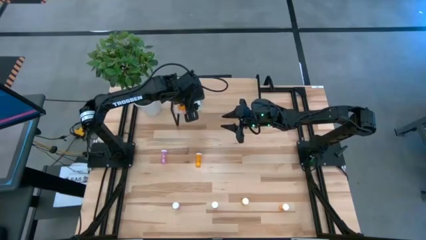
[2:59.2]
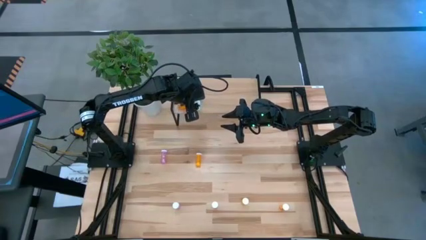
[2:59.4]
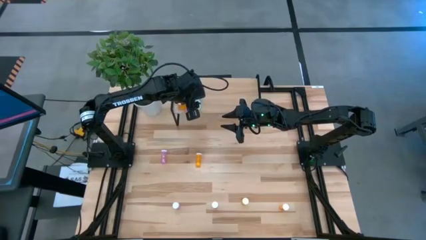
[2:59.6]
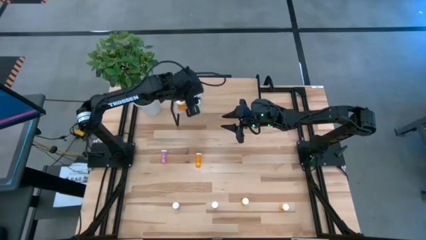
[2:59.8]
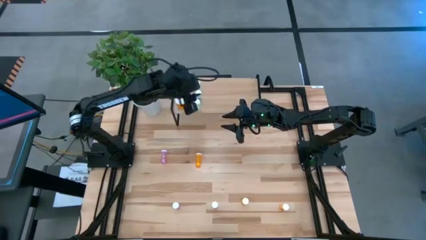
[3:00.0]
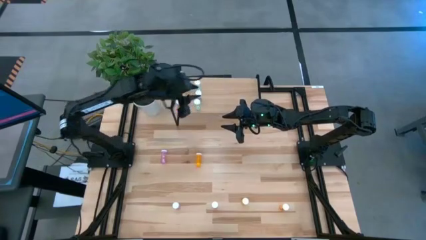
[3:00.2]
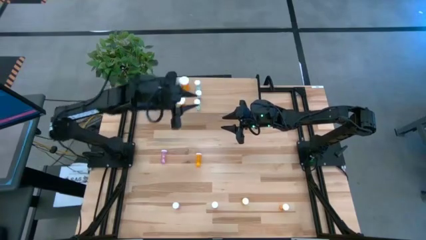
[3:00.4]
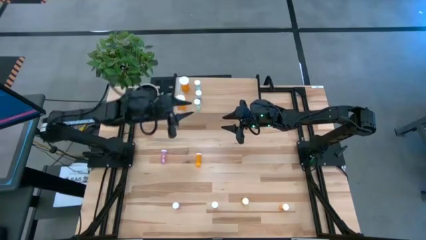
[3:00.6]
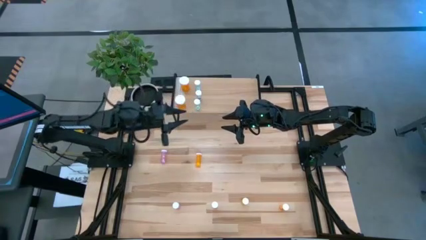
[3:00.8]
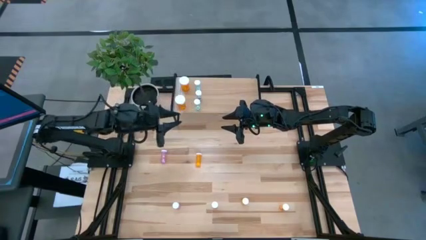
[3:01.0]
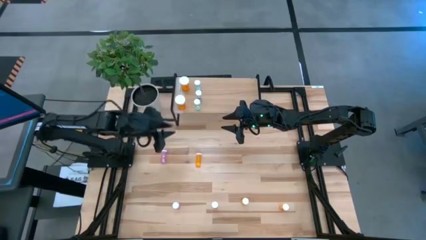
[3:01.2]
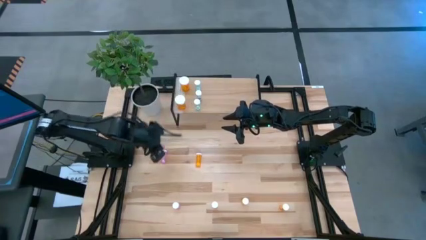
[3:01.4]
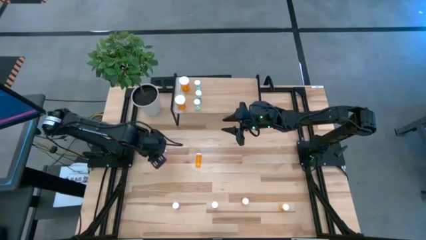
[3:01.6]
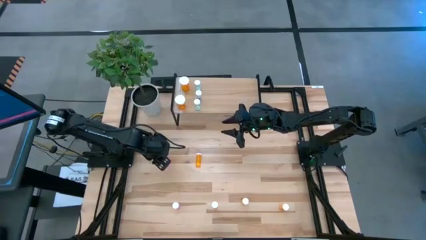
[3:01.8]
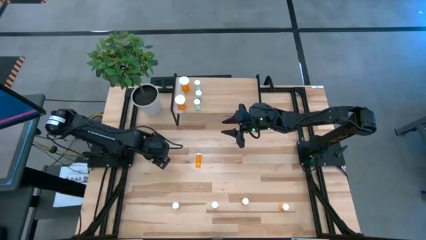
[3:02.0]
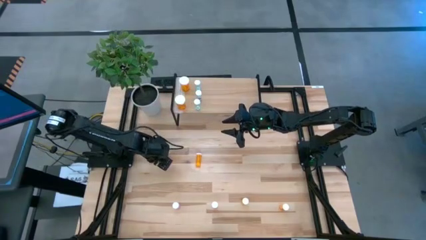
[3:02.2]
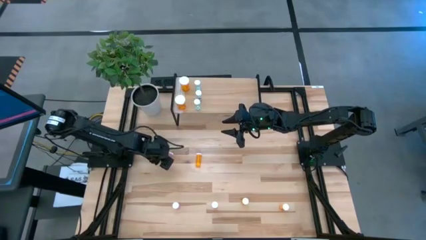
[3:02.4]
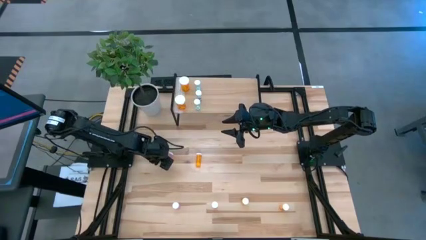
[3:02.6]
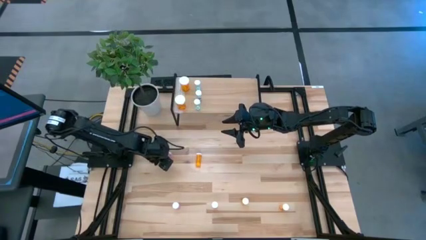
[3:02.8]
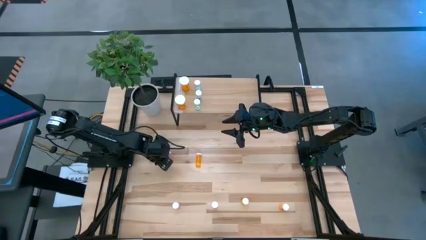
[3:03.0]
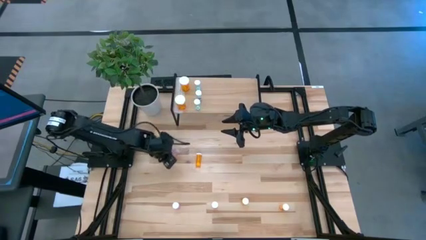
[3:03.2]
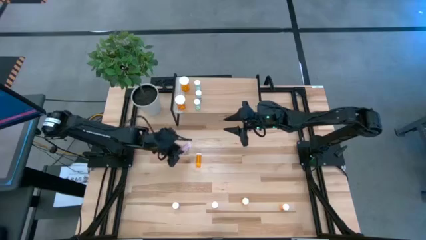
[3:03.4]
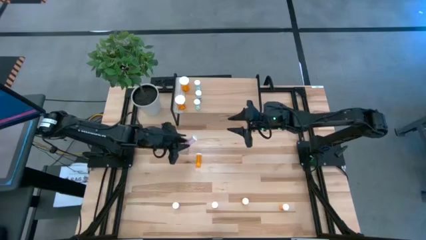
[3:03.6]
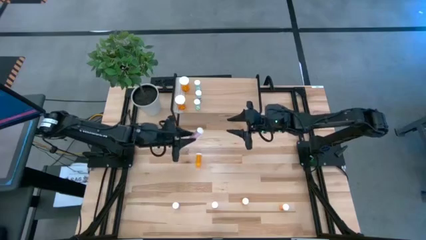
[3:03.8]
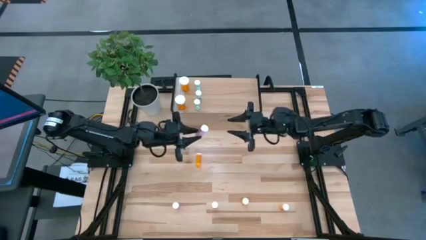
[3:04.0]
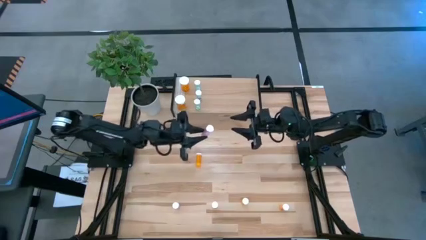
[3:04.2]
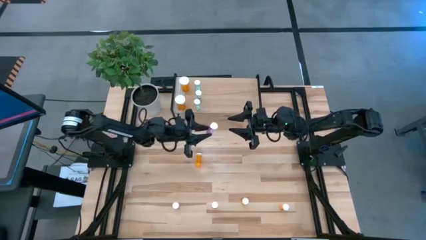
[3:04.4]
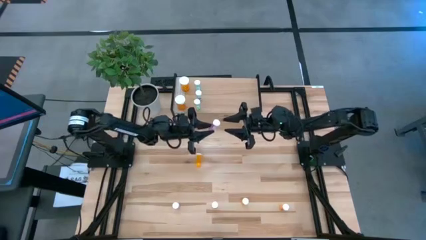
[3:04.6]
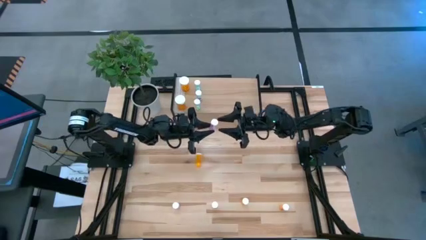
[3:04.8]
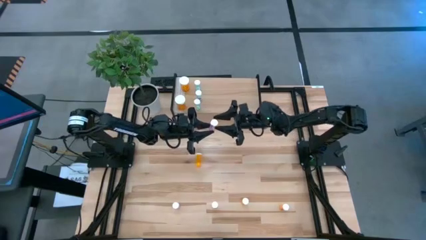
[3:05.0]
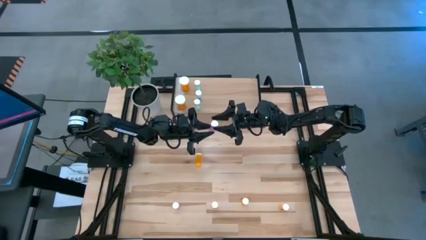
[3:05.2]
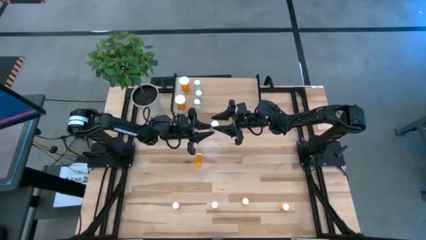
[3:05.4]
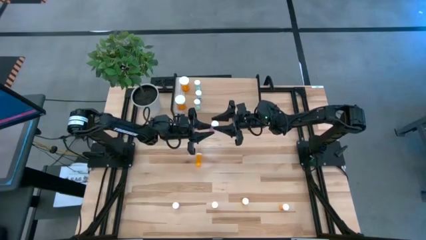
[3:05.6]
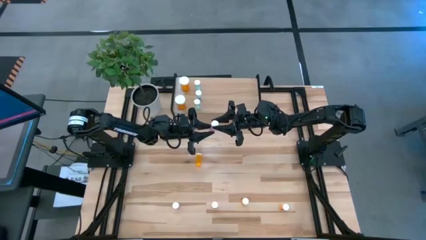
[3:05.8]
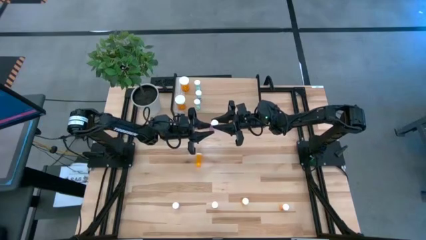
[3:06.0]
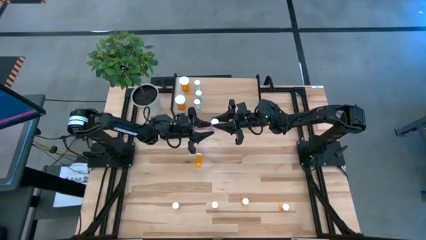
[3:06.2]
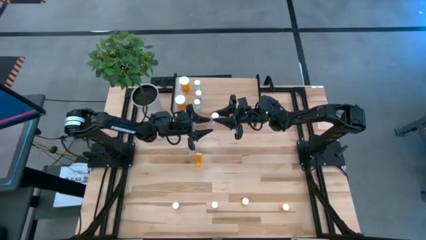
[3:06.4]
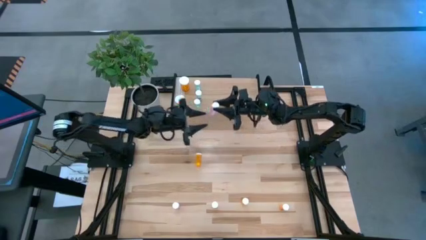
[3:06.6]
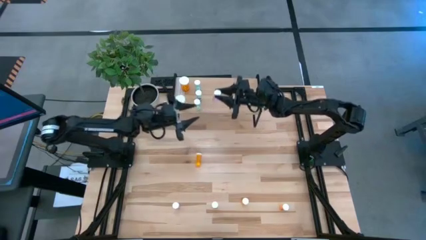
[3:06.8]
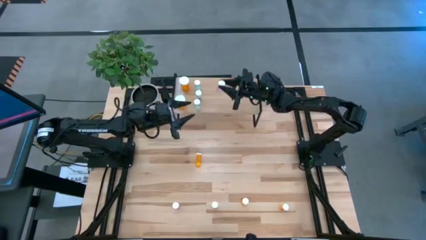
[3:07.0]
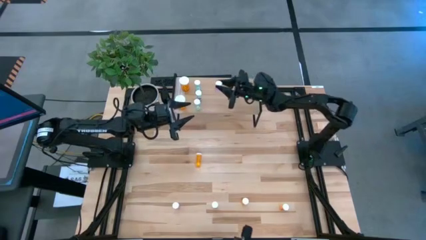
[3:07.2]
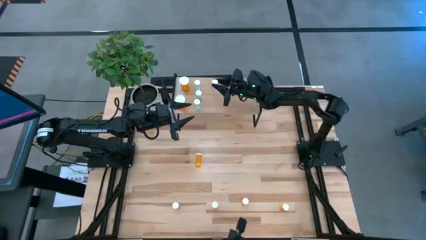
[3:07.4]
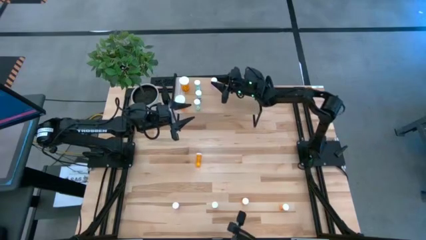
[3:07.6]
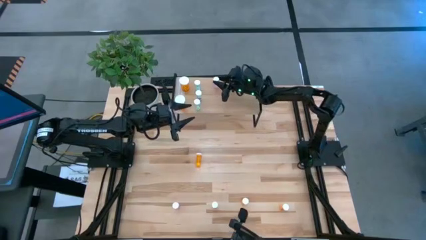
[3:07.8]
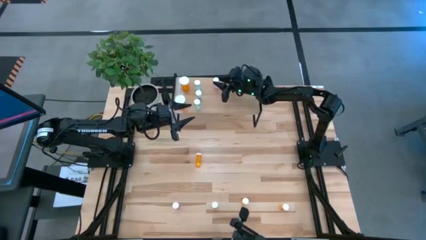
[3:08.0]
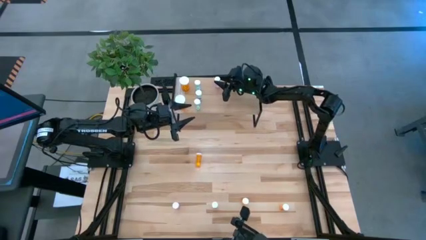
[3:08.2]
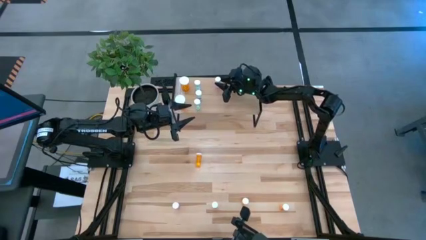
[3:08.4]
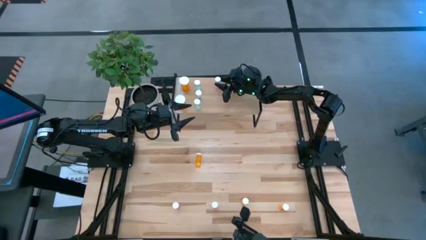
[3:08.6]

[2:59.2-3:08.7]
Task: Pick and place medicine bottles onto shelf by color
Put the top left pink pill bottle on the shelf

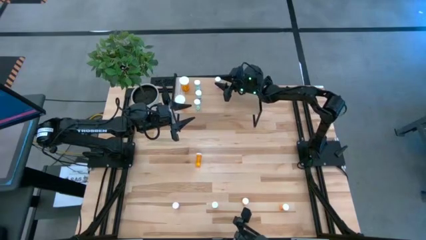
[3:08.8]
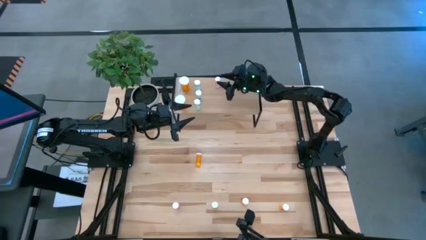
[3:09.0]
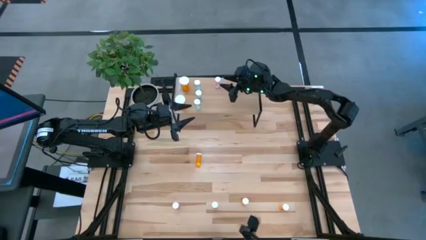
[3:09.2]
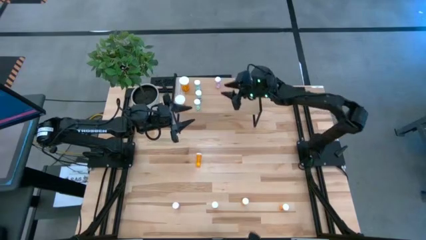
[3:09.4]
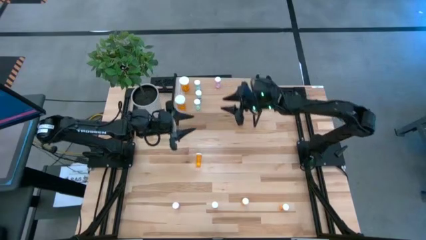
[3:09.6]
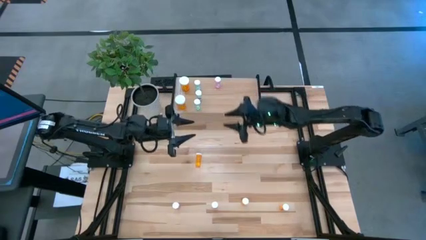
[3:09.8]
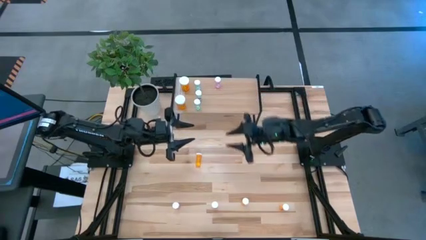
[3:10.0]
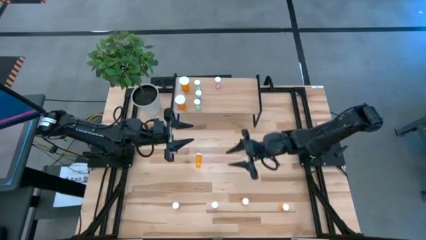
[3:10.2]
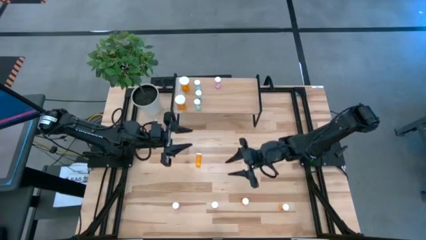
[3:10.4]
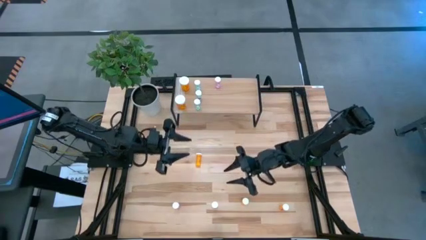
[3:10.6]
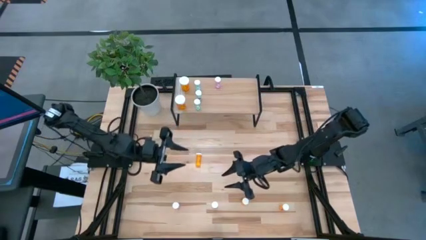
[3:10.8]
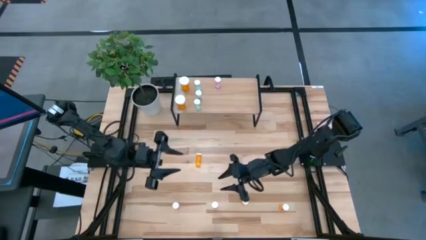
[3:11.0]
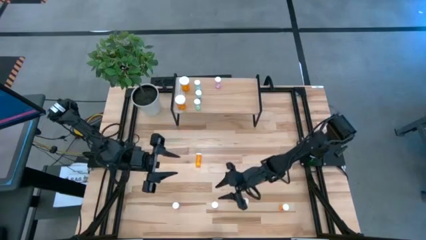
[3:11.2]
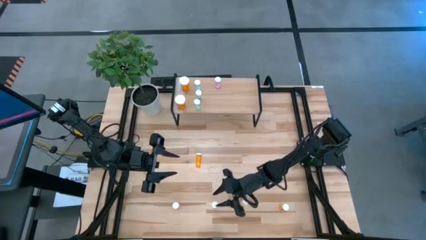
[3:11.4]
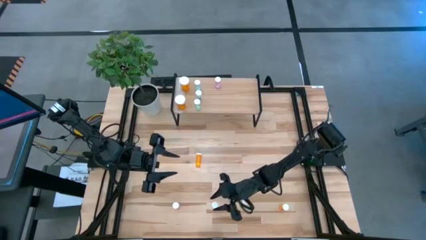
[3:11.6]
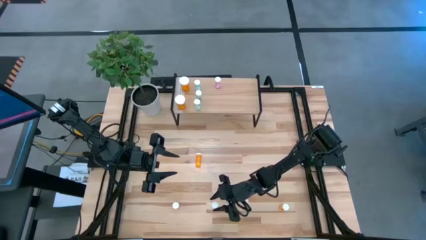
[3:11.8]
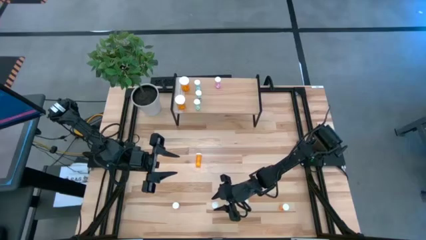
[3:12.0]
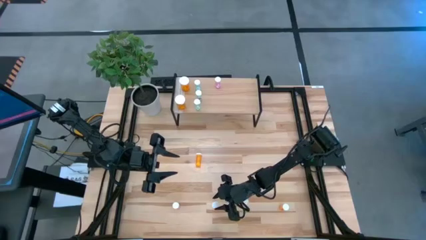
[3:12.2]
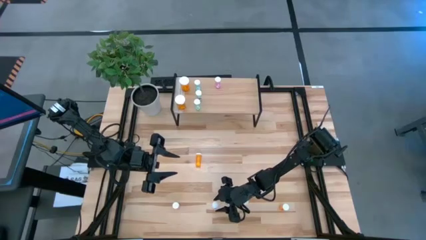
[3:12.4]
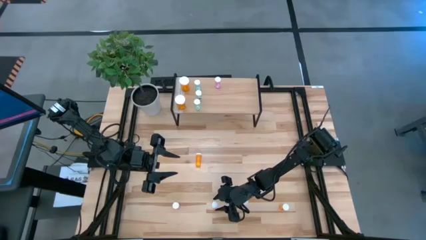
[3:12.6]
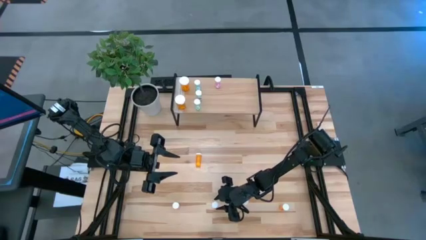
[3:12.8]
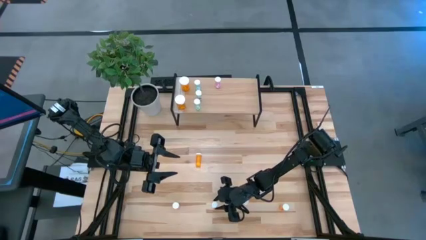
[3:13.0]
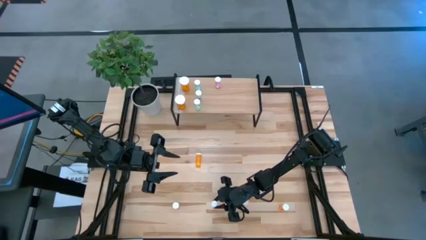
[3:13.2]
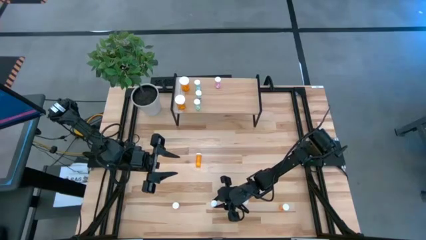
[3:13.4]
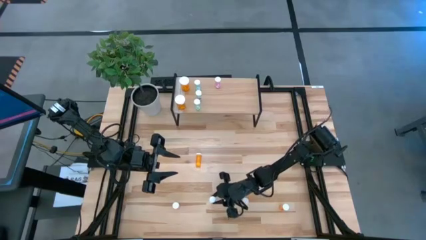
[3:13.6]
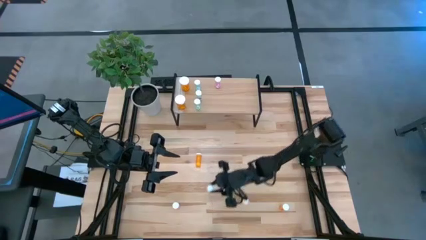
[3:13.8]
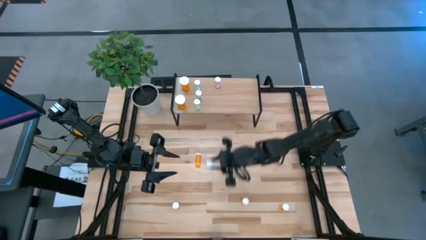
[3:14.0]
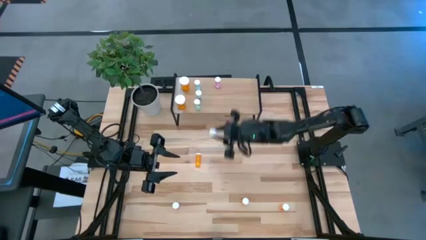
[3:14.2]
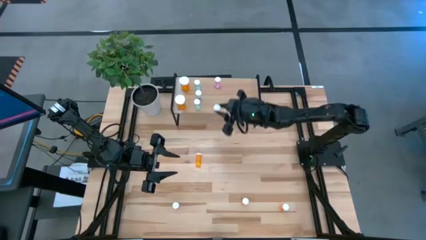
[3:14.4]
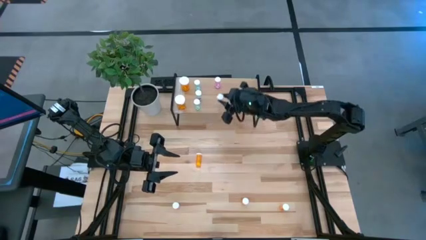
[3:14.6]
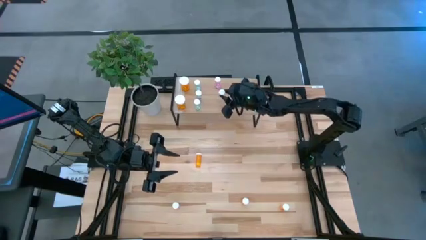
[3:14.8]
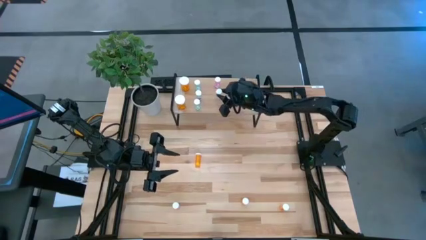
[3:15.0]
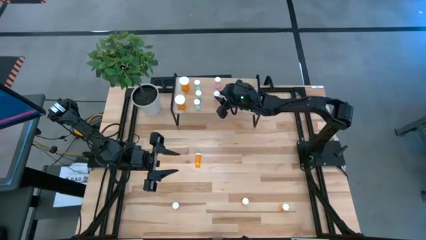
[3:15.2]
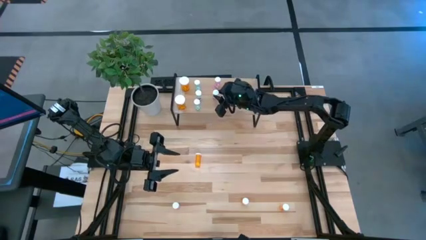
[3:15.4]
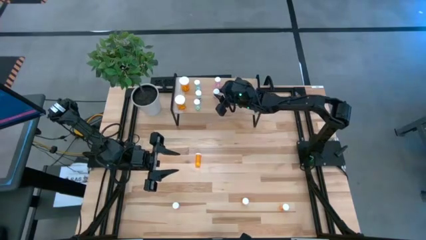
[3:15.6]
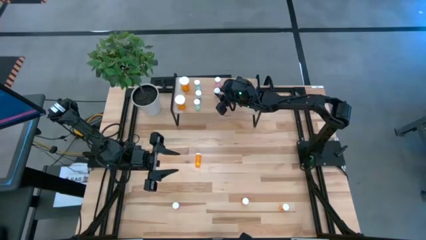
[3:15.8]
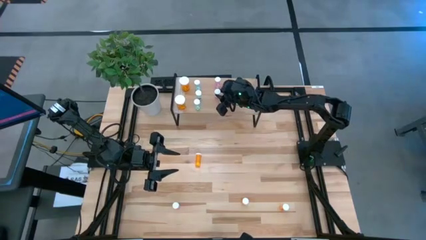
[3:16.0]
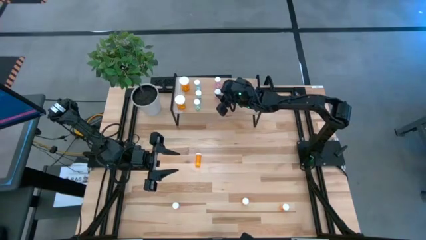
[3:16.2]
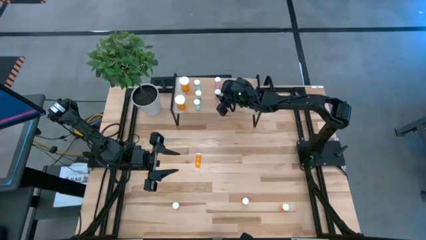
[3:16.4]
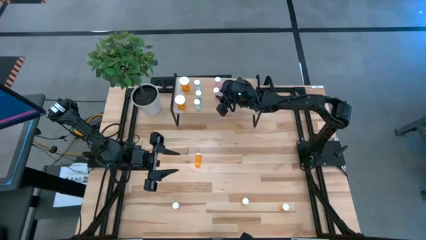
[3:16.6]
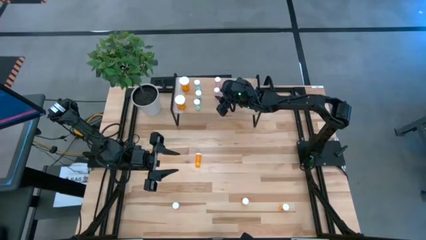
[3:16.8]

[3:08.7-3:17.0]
Put the right pink pill bottle on the shelf aligned with the other pink pill bottle
